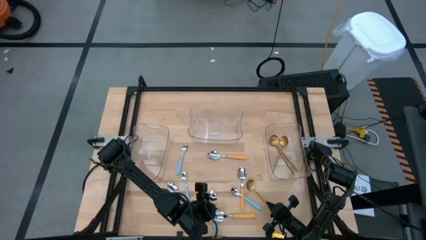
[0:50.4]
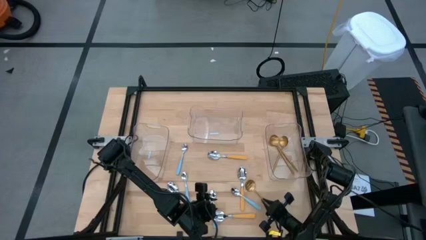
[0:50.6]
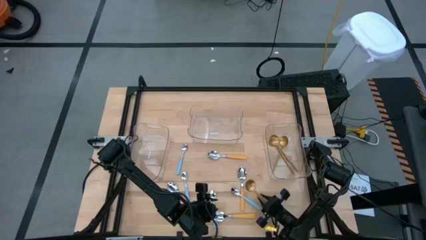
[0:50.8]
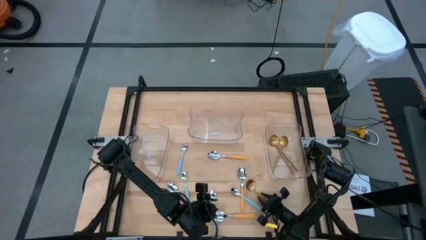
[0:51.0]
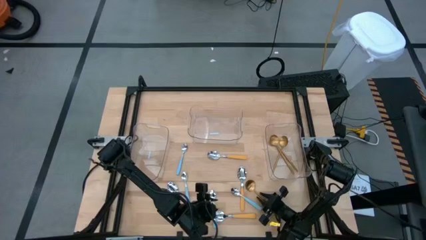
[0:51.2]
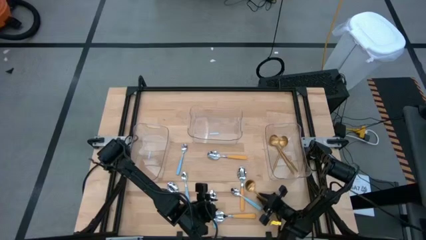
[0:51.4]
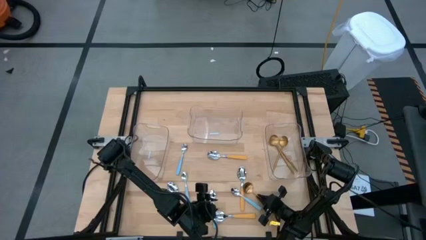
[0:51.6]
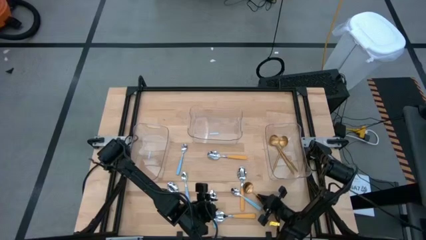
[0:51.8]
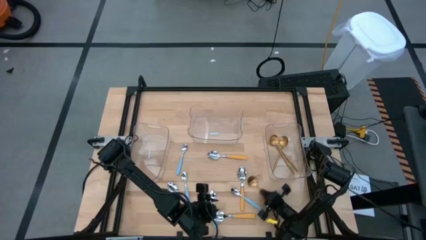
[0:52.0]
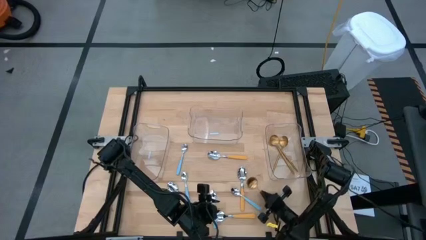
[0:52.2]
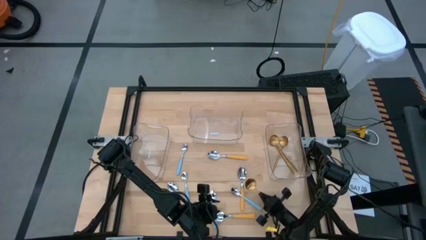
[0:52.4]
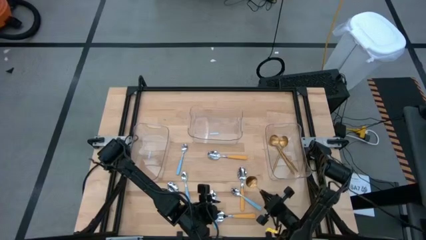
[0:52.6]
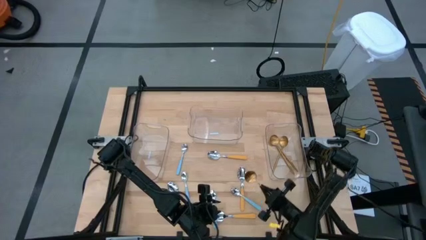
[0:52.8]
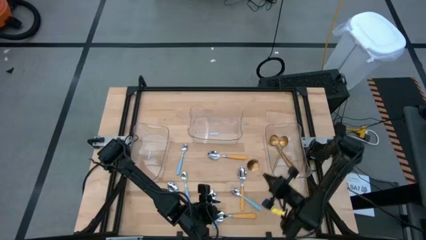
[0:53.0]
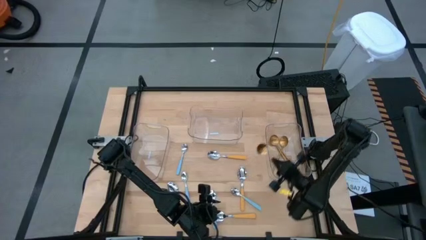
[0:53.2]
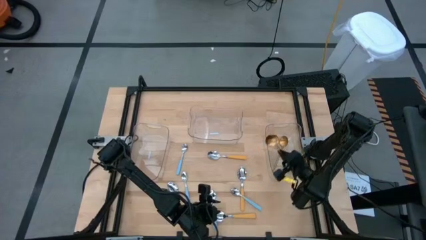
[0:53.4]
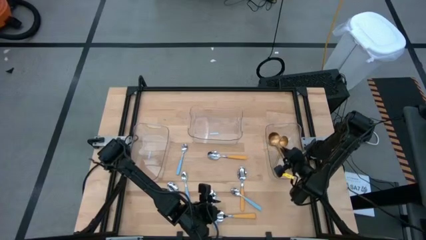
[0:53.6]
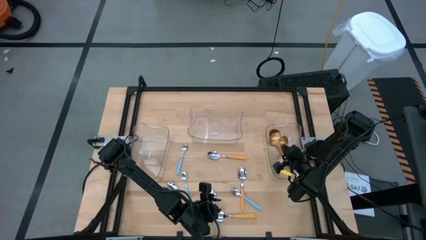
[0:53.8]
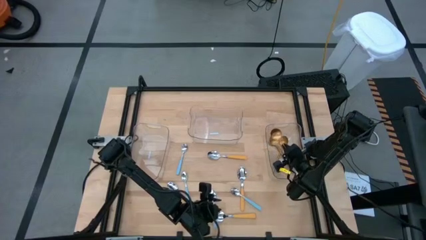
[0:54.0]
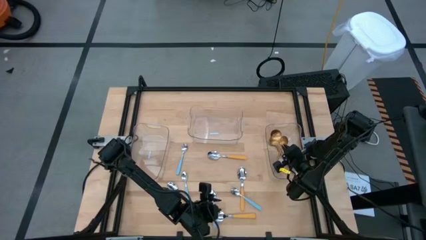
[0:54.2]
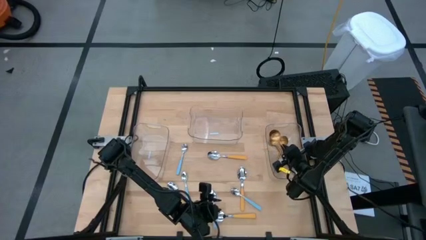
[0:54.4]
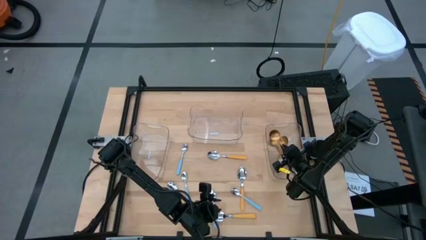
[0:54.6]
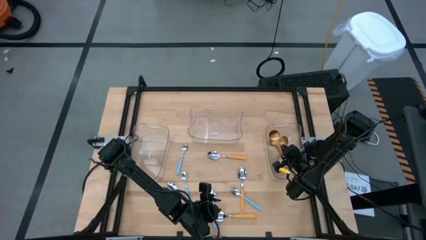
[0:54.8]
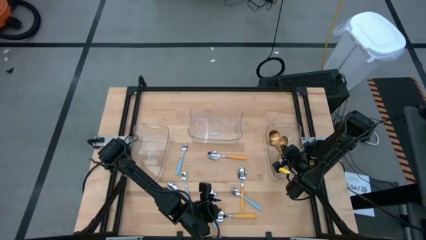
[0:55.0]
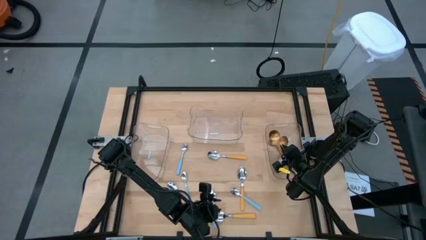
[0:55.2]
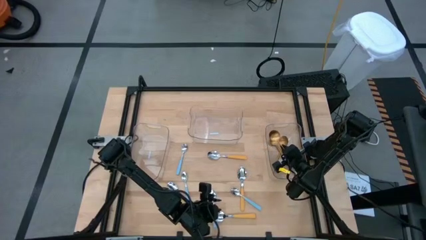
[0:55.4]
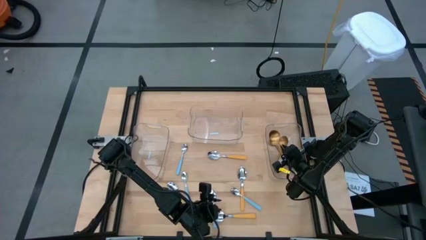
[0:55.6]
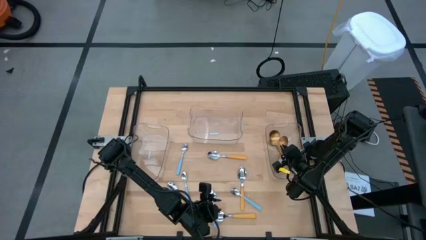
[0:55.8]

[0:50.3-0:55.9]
Task: Sort silverware by color (type)
Put the gold spoon into the right transparent bin

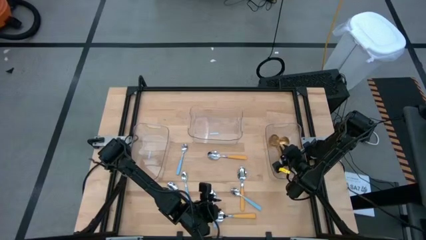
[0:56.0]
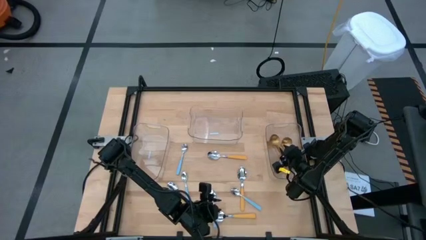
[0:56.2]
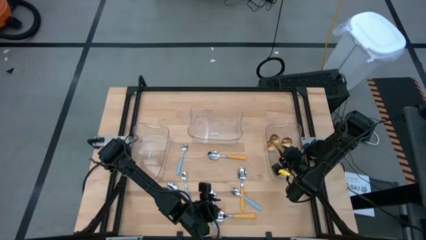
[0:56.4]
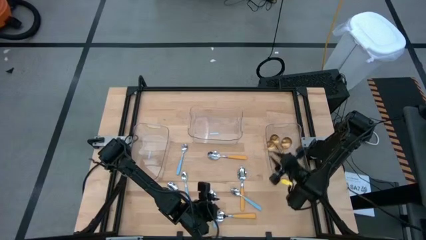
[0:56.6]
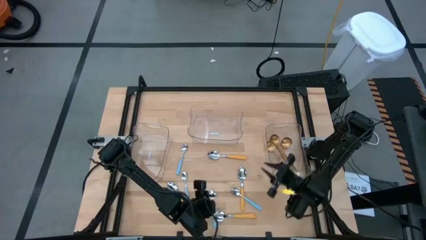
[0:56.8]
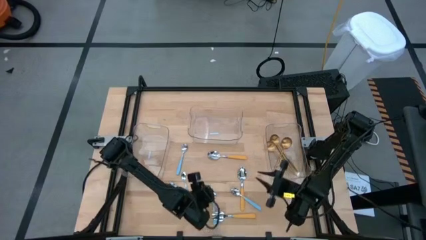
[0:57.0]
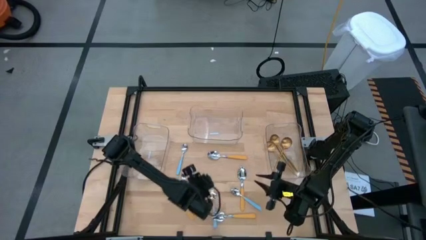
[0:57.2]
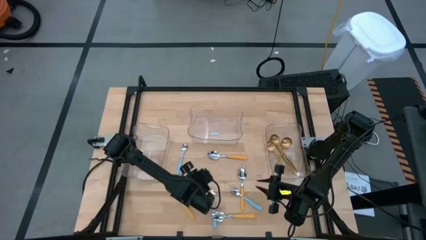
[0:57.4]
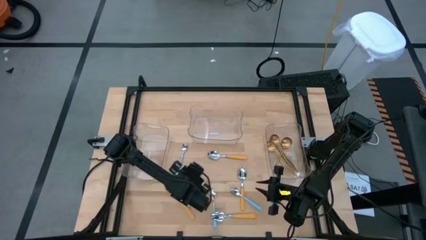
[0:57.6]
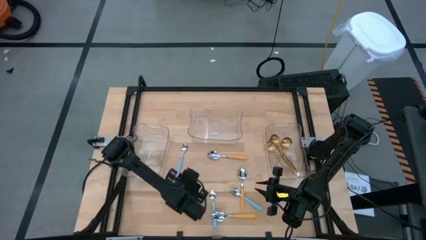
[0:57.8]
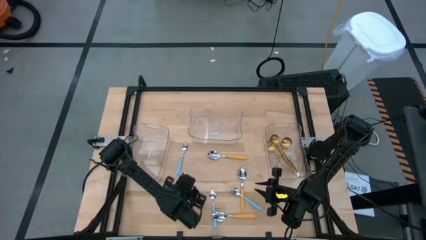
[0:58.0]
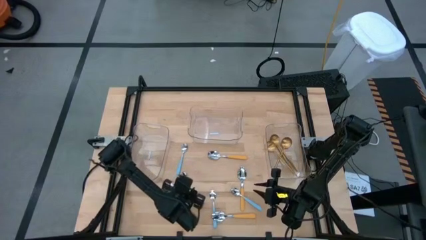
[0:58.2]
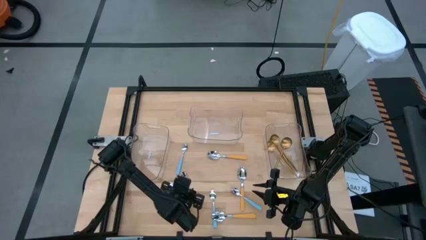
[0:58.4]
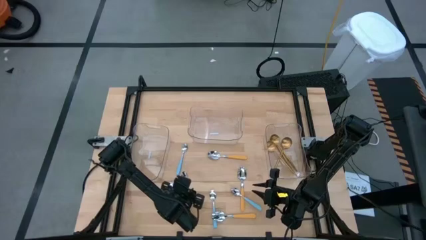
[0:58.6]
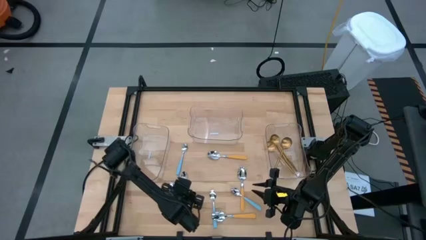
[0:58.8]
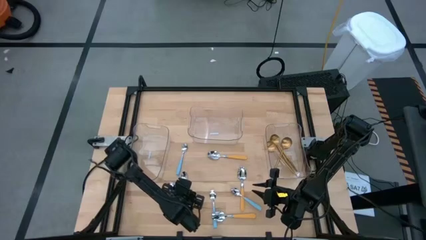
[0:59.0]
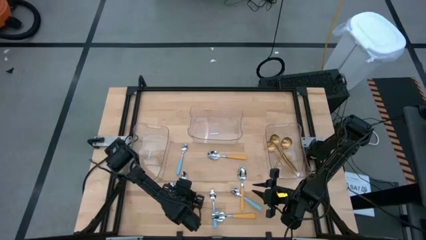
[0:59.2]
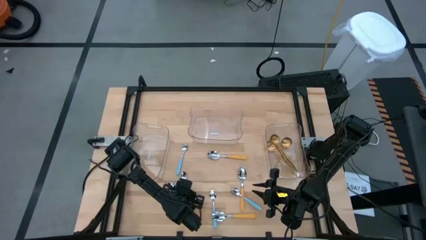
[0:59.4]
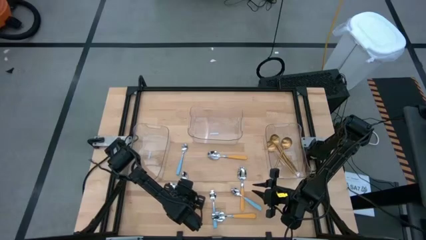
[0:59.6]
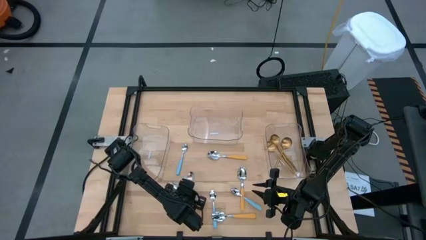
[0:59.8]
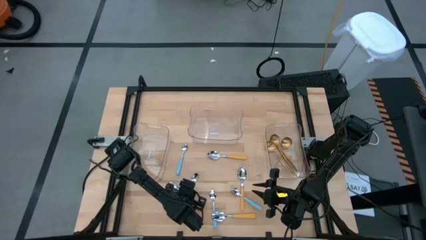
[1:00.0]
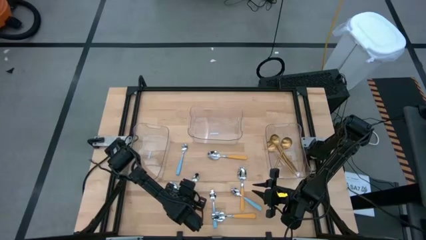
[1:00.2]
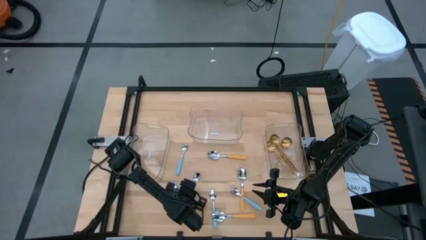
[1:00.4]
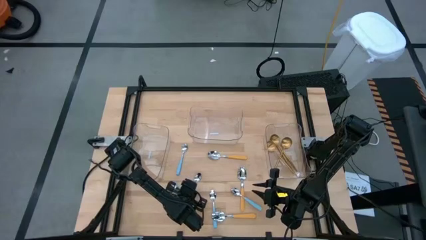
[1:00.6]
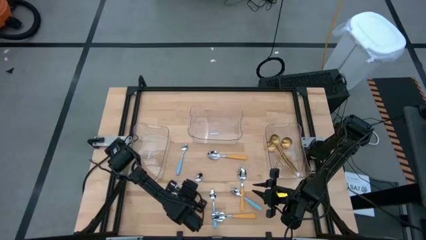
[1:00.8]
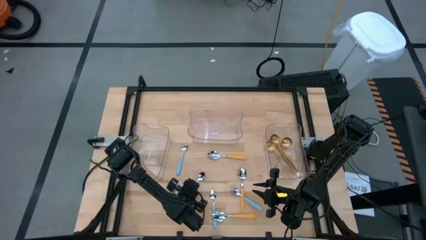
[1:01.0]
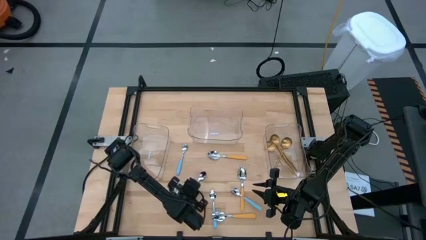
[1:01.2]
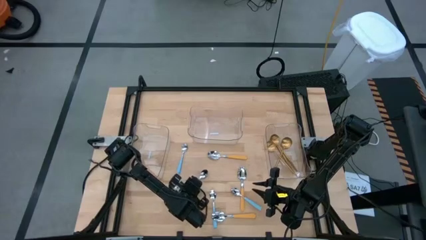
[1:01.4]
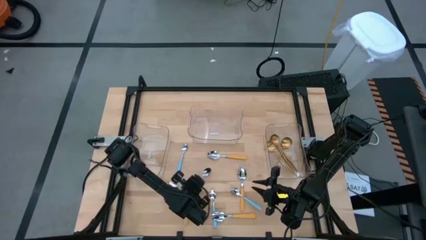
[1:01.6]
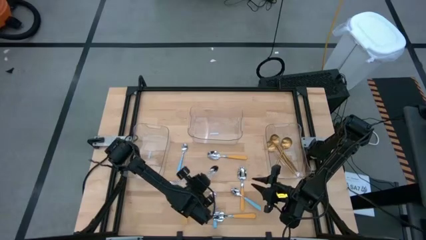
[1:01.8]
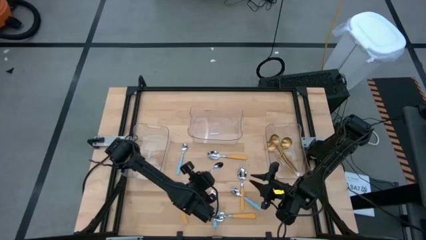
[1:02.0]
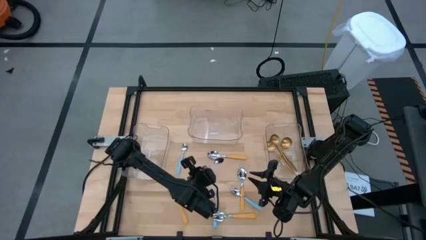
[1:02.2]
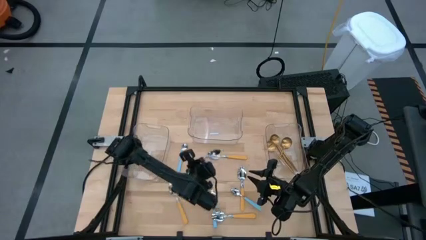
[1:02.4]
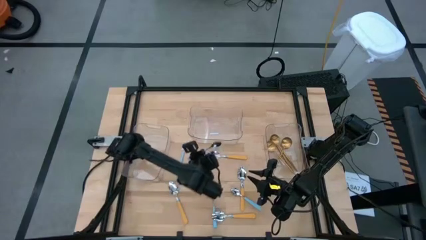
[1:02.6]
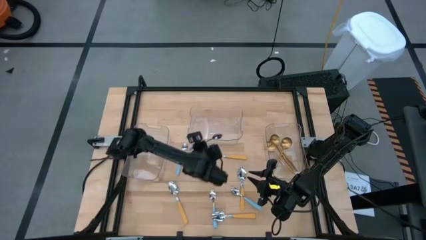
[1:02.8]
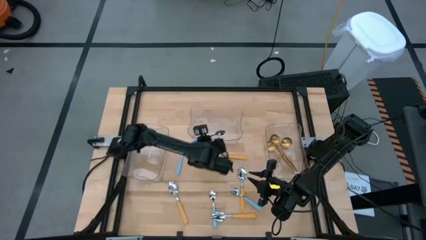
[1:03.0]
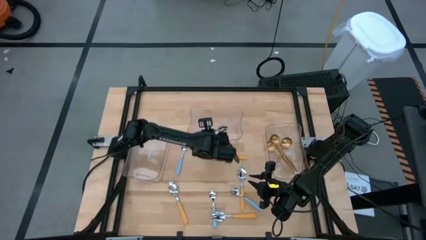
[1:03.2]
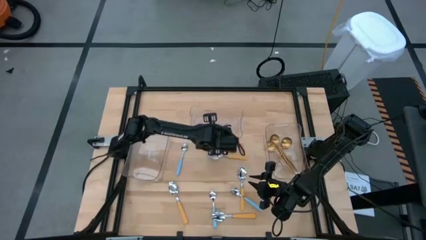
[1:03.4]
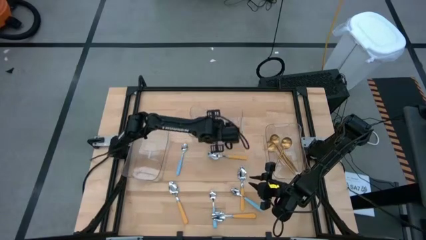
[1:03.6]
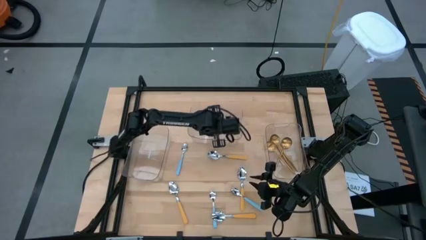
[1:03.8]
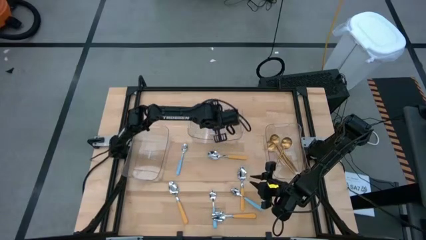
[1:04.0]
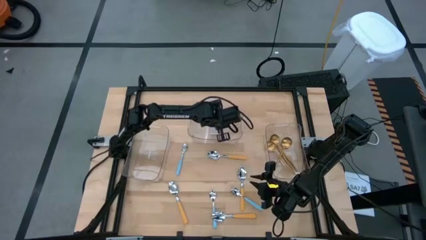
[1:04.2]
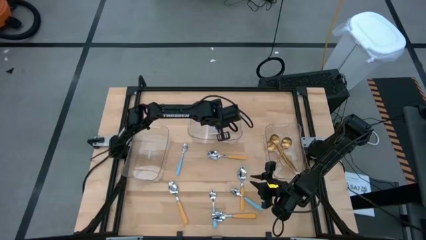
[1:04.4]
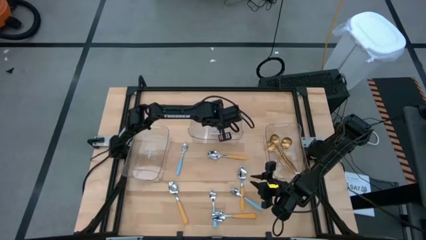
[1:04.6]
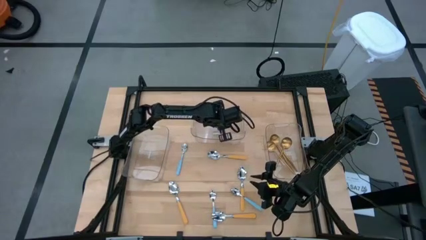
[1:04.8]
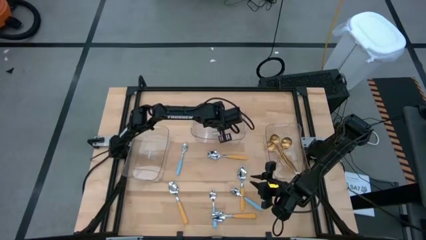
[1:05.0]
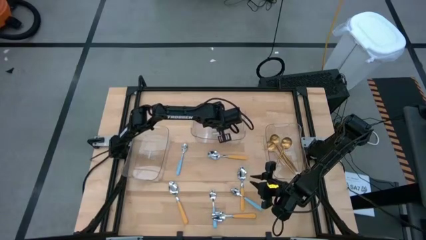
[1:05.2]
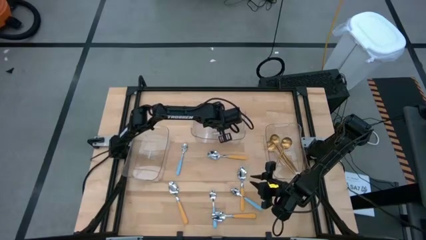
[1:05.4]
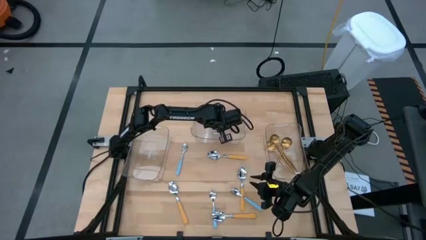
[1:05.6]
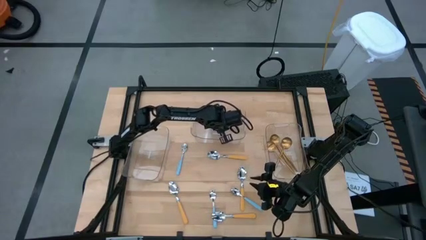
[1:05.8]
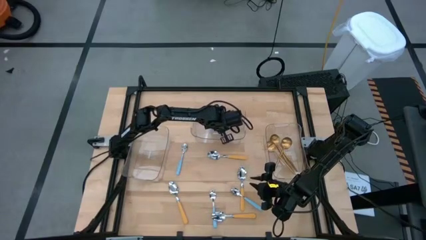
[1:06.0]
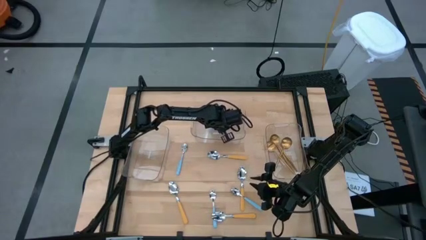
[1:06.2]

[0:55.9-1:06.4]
Put the blue spoon into the top transparent bin
